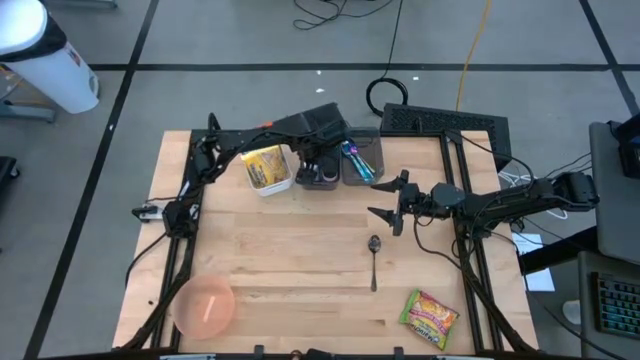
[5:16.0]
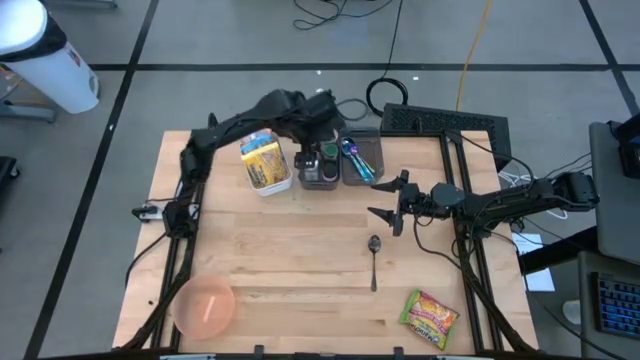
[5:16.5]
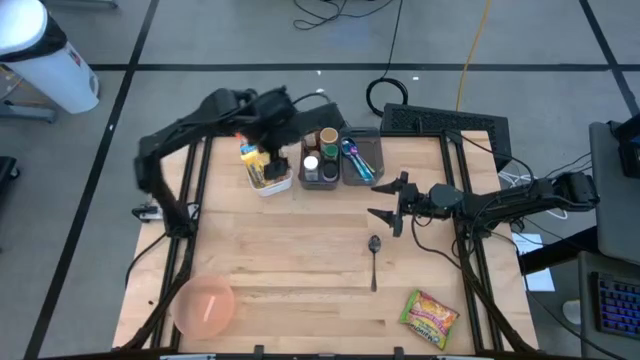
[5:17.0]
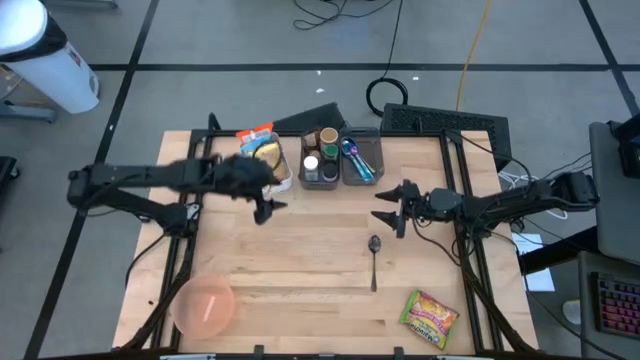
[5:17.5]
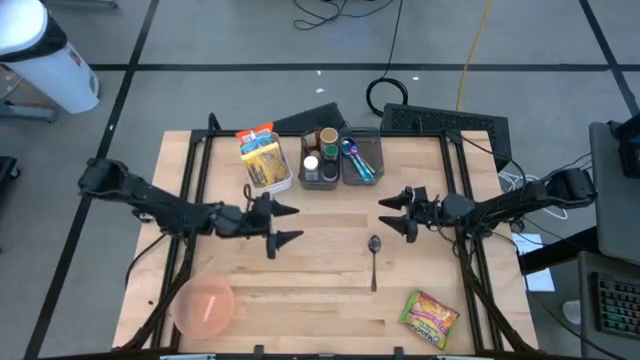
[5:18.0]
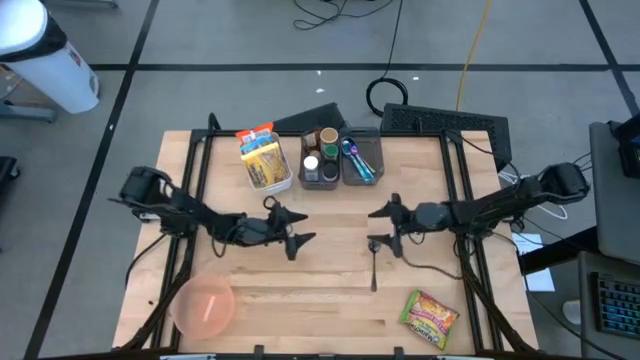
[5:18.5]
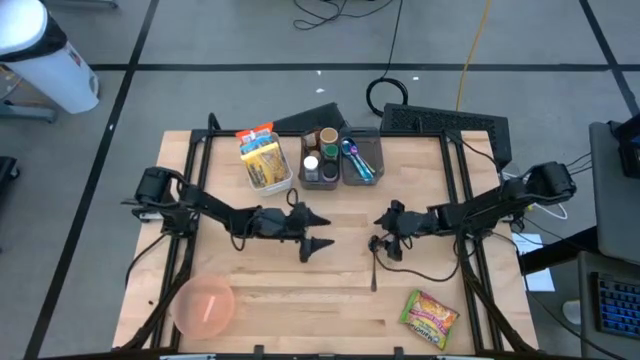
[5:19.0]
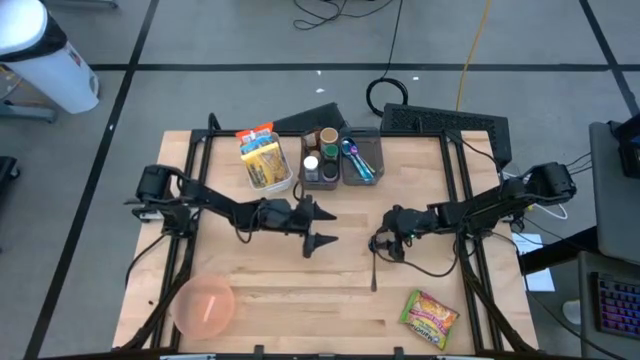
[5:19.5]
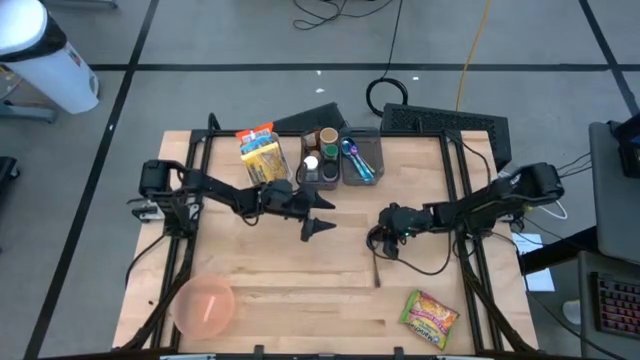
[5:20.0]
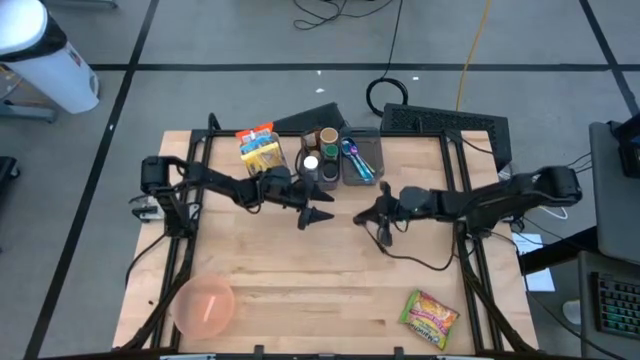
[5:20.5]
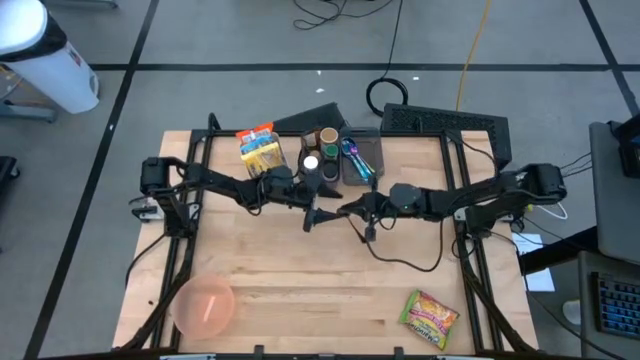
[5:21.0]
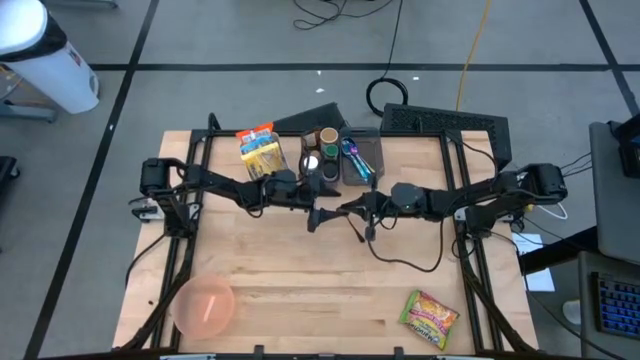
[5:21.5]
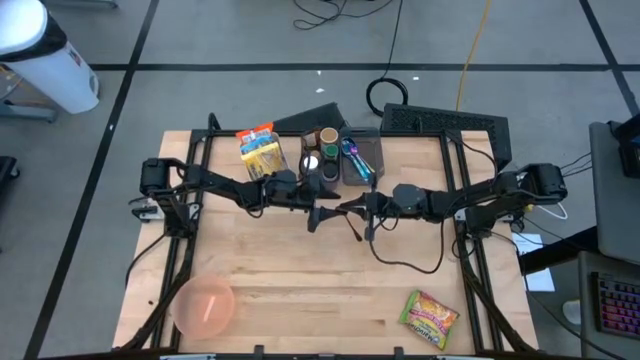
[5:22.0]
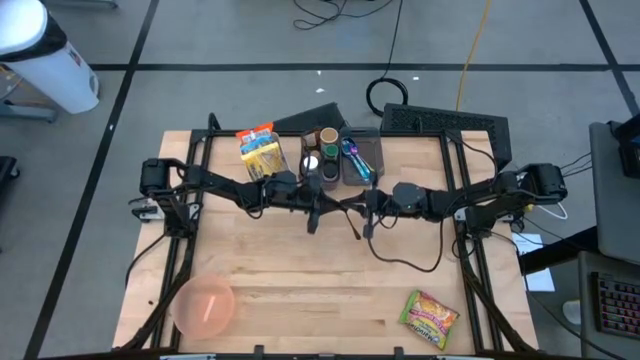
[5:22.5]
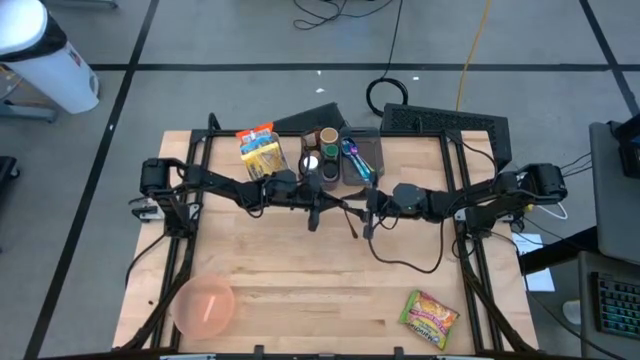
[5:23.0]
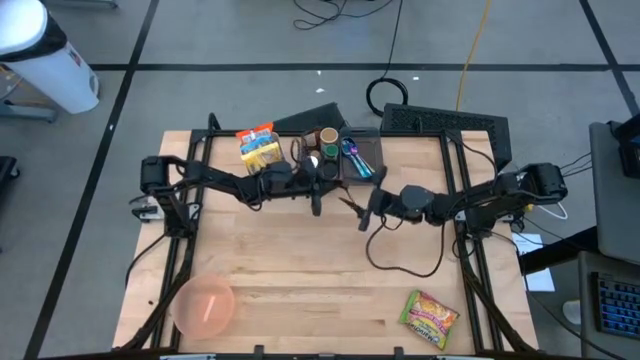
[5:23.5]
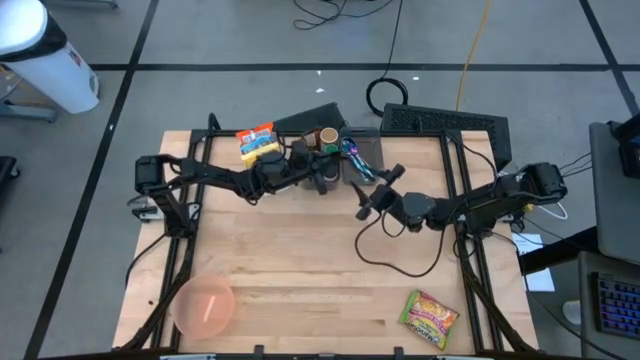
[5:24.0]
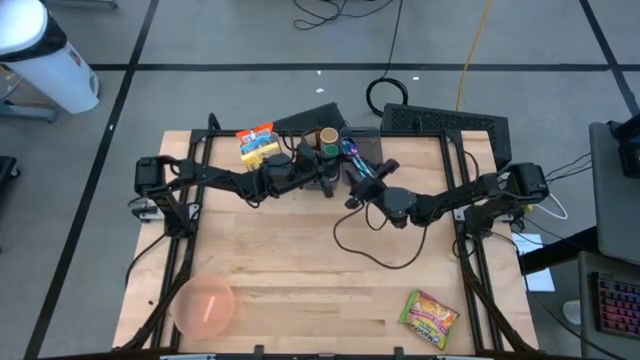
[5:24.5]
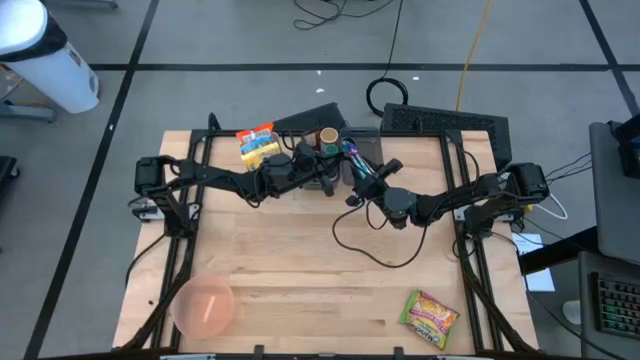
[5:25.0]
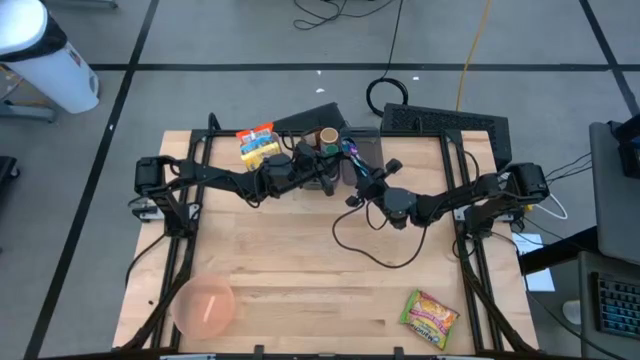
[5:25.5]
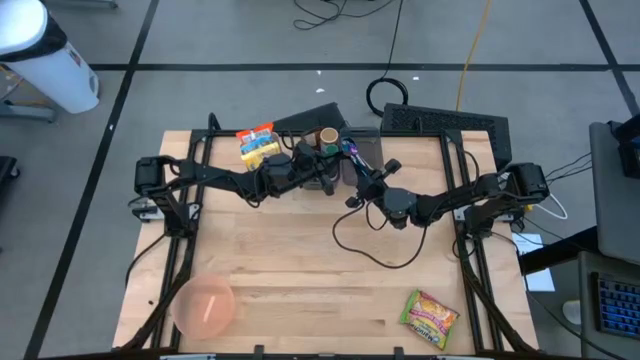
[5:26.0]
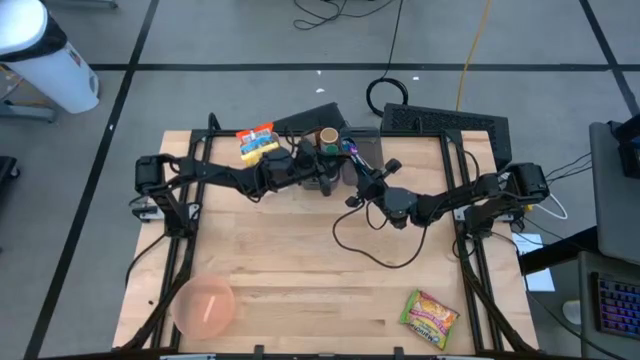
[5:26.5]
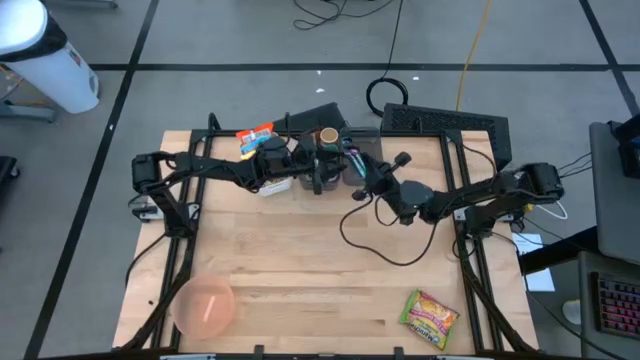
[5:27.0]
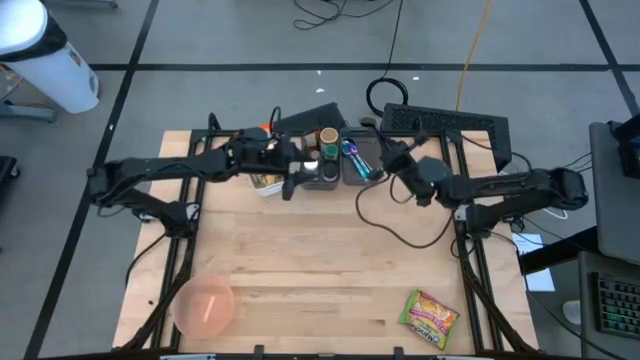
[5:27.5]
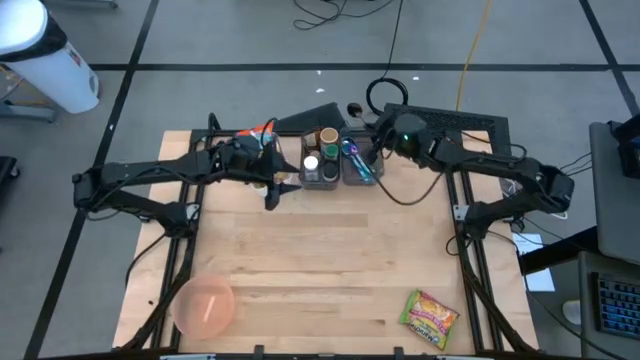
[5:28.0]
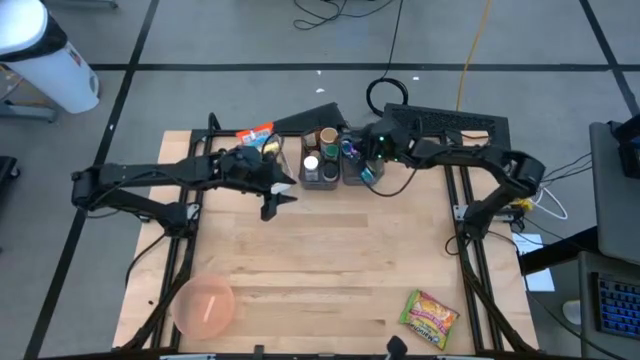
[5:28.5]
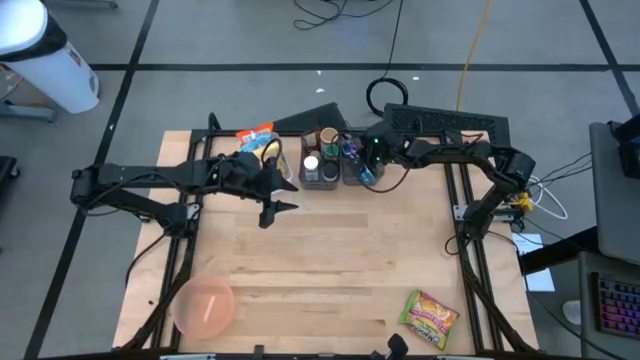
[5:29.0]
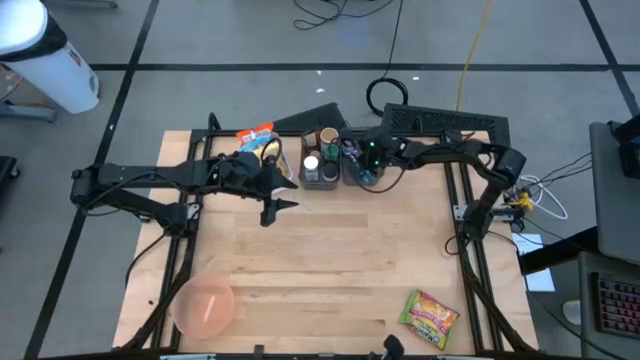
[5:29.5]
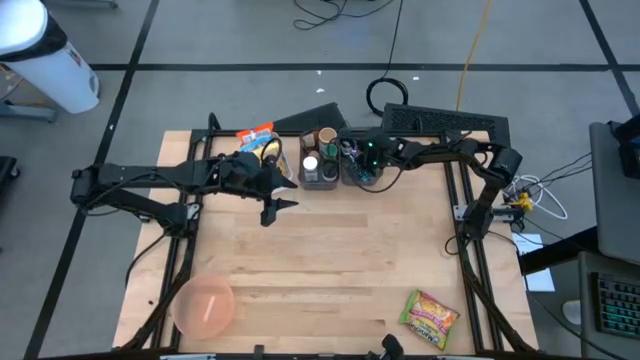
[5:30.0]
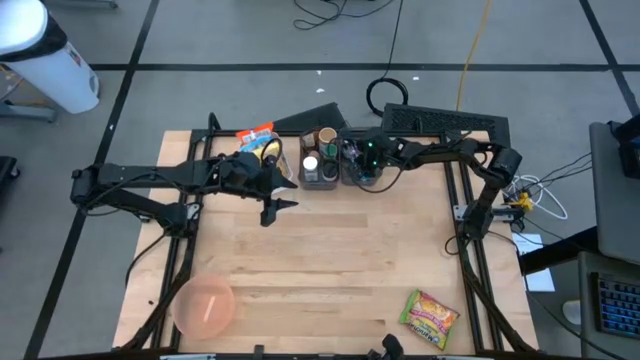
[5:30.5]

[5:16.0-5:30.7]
Task: Pick & Place Food Item
Put the black spoon into the right black bin

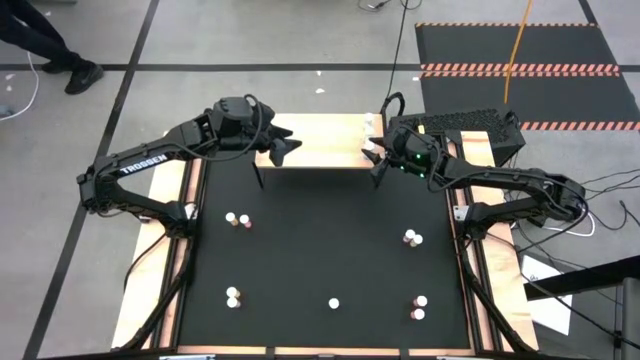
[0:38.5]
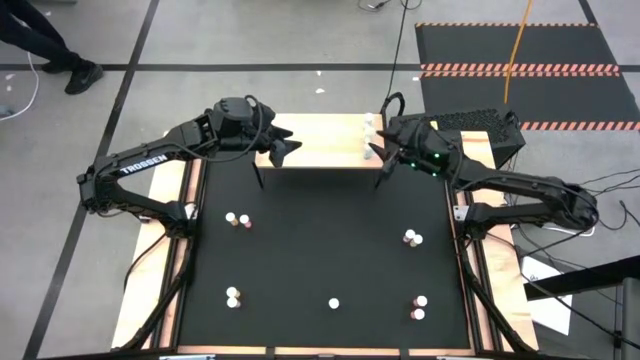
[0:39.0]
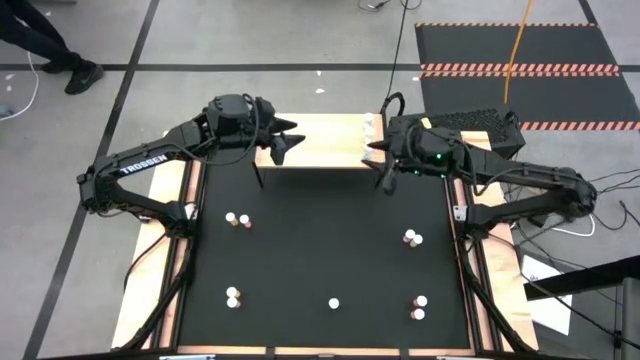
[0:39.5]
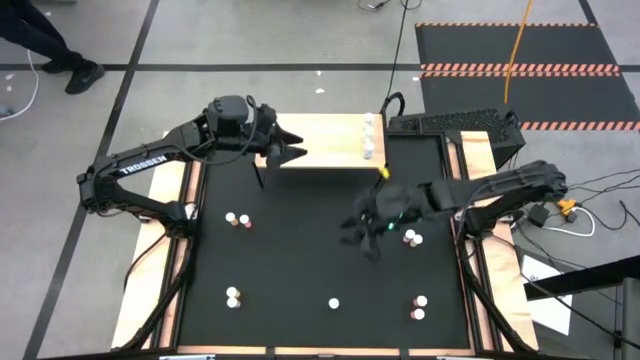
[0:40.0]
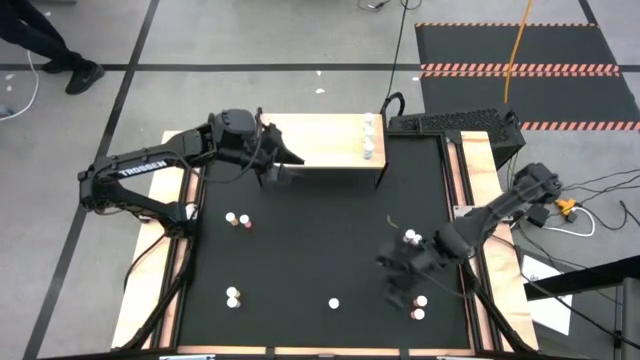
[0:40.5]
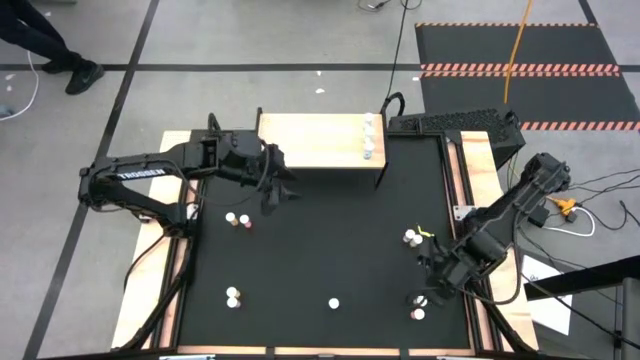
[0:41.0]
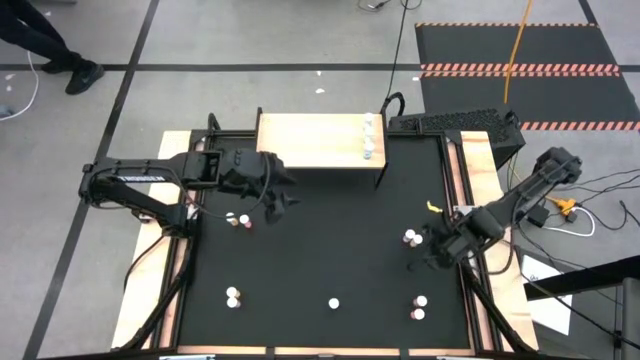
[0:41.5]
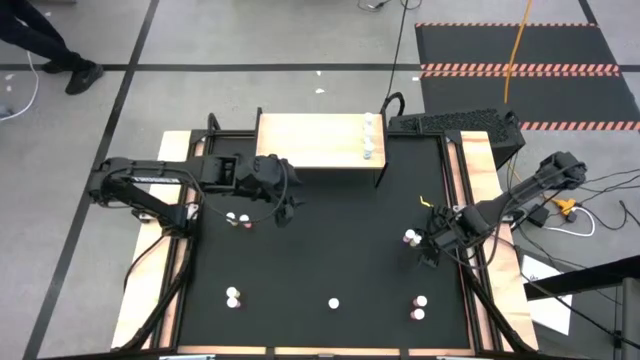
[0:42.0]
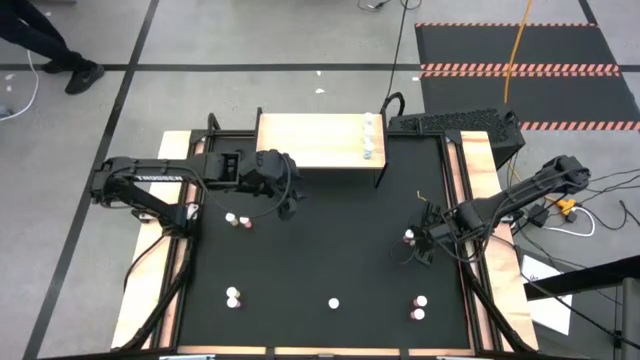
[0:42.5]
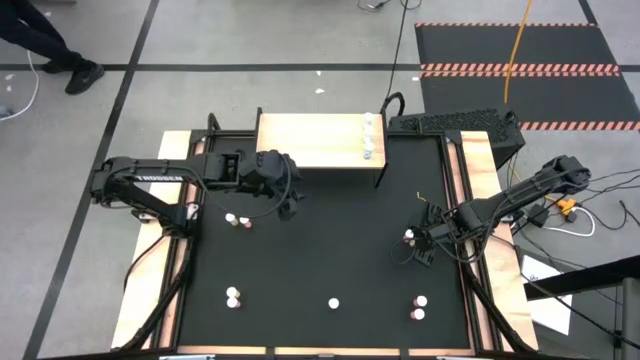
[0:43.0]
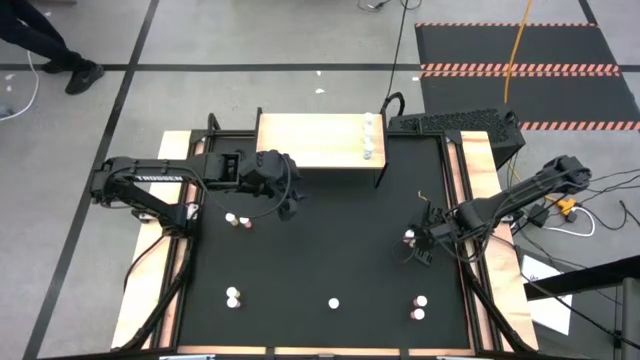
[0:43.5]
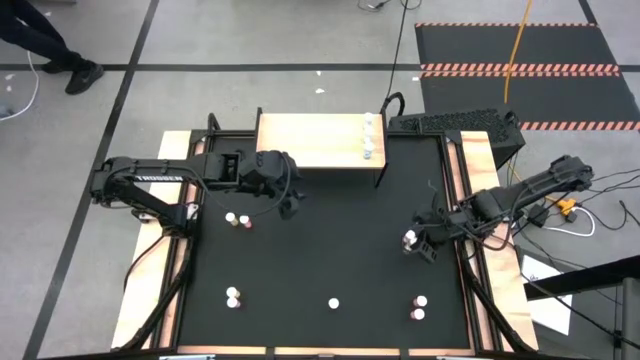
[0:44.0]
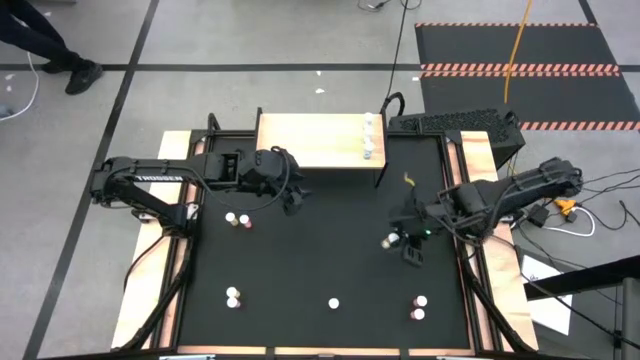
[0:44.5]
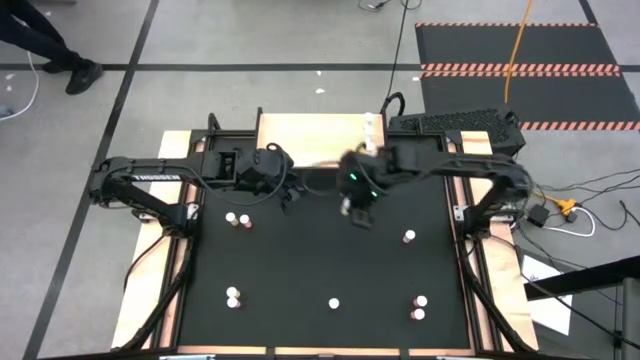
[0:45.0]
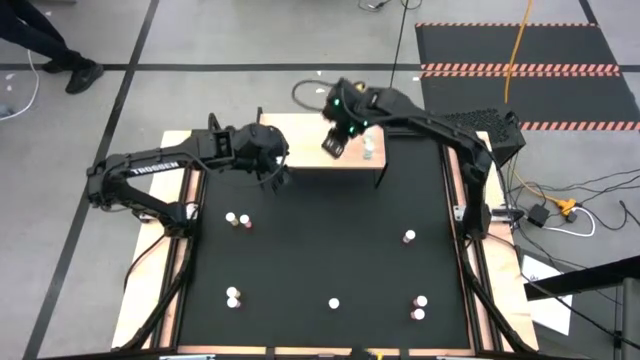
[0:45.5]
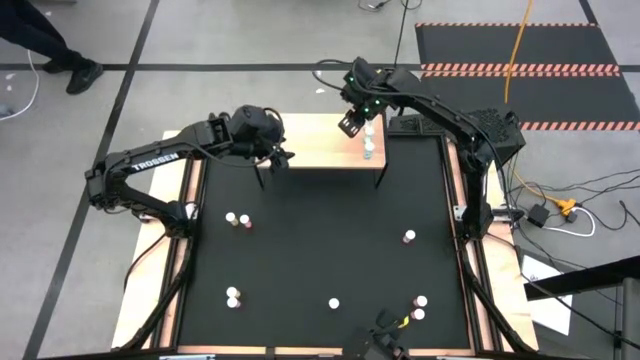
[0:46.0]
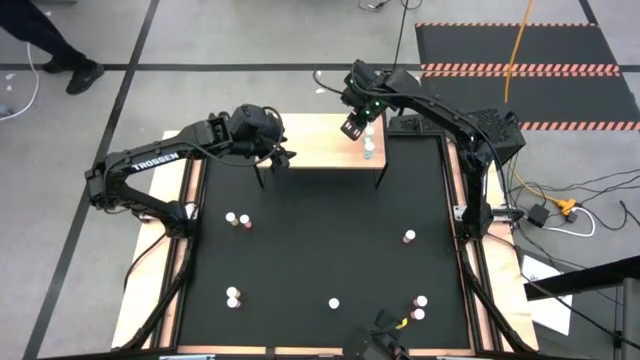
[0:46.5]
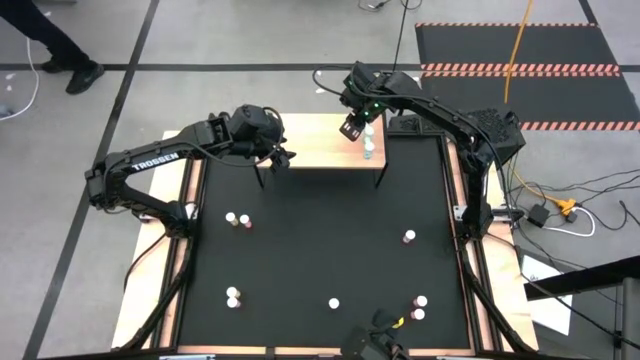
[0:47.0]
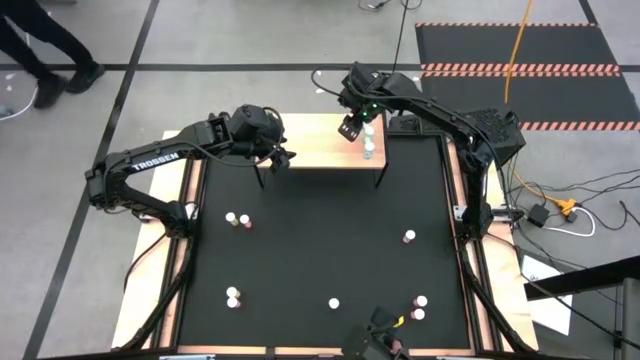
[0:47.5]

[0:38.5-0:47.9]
Task: Pick and place medicine bottles onto shelf by color
Put the right yellow pill bottle on the shelf
